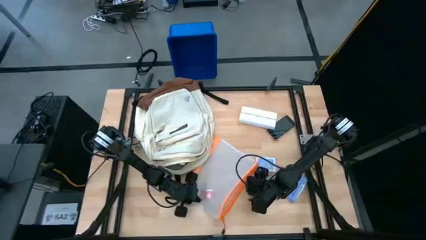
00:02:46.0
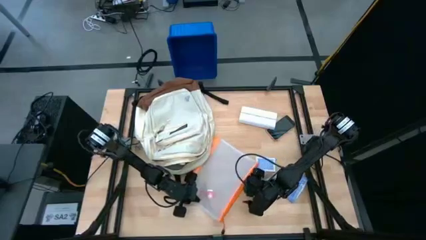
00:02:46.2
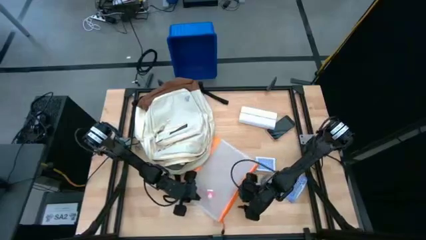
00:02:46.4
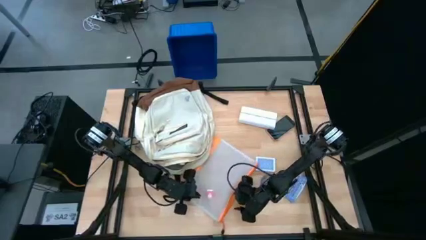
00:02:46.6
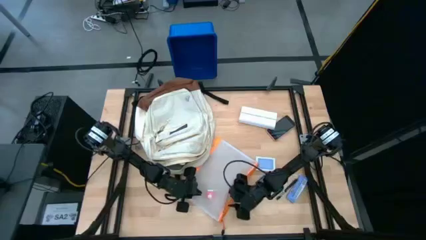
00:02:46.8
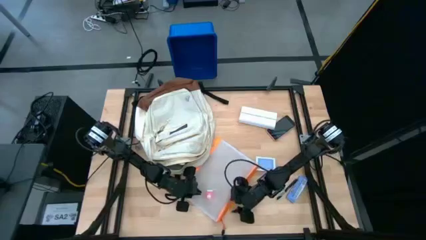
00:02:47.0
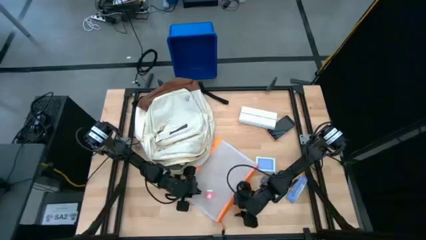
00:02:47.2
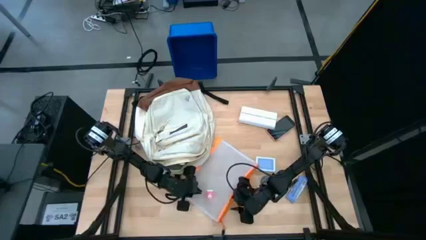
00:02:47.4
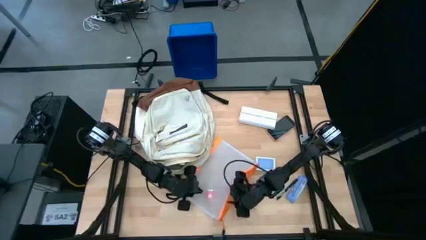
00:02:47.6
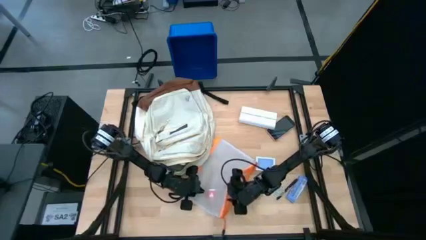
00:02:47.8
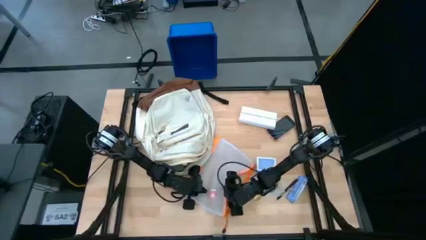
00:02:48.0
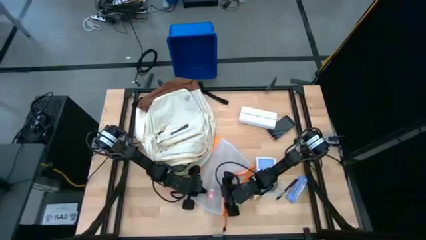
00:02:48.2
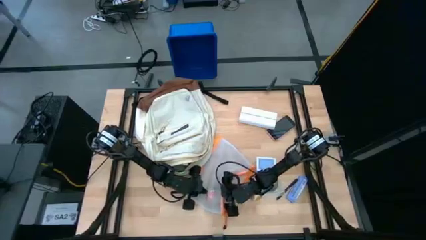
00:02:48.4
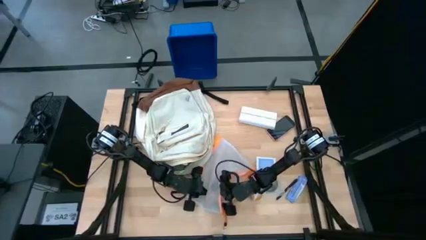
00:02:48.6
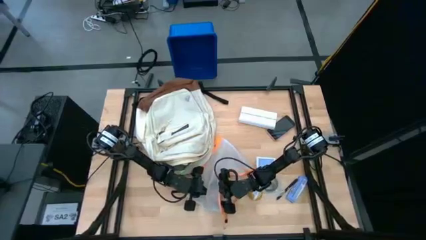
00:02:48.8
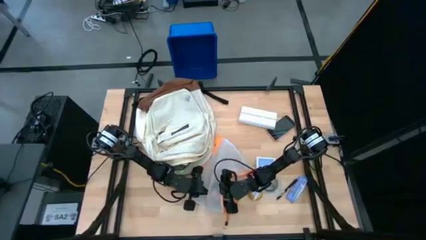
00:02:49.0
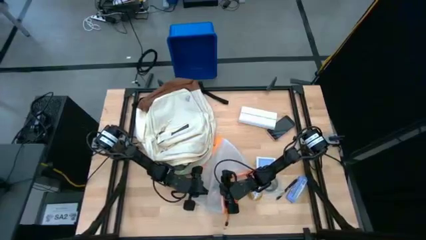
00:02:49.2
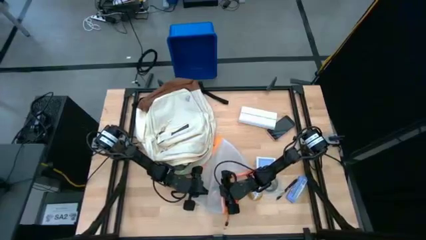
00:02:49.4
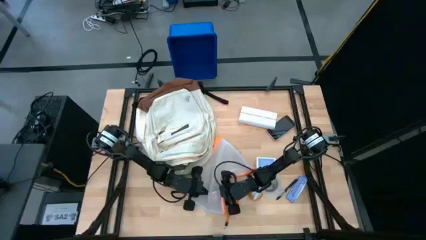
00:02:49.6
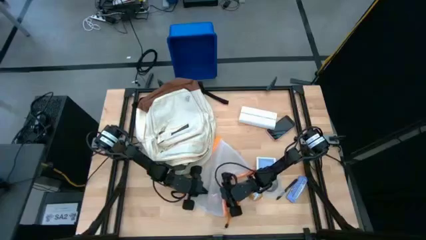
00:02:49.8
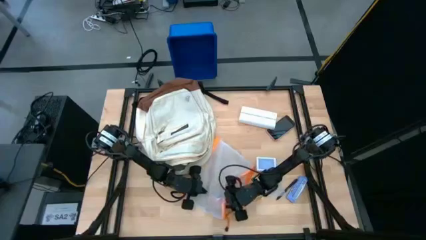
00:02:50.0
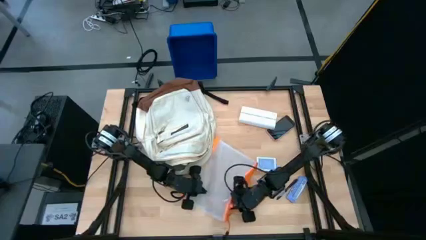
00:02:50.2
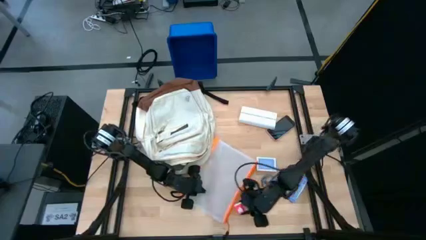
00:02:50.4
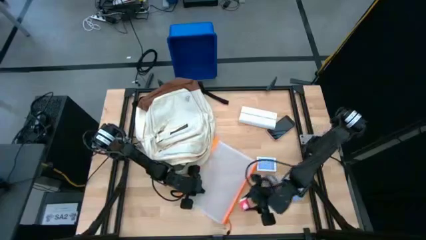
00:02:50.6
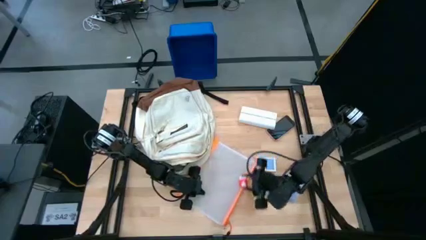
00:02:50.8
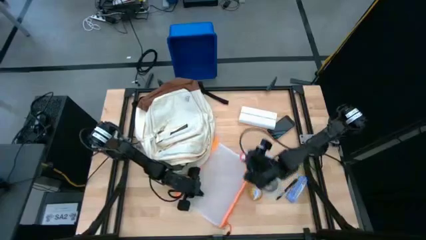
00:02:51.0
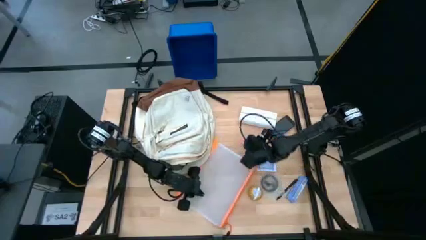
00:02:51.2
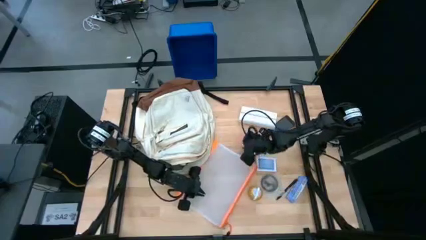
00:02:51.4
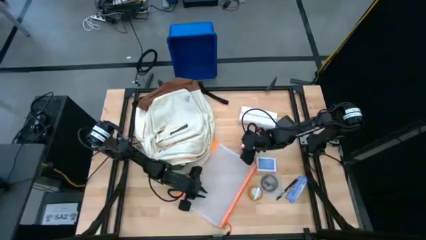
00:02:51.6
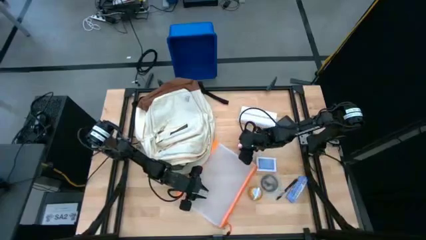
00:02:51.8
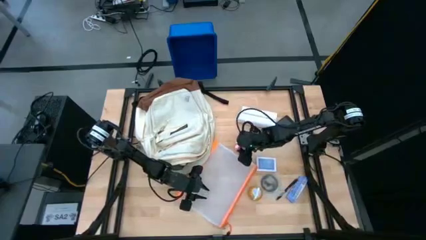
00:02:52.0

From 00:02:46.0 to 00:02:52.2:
Task: Unpack backpack
Remove the red charger adapter from the zip bag

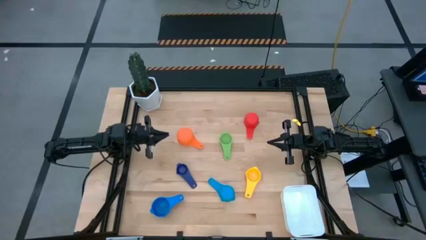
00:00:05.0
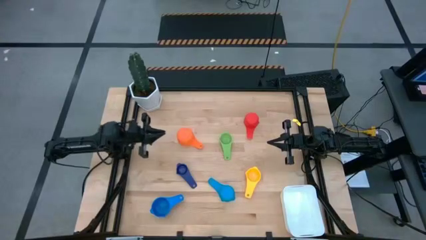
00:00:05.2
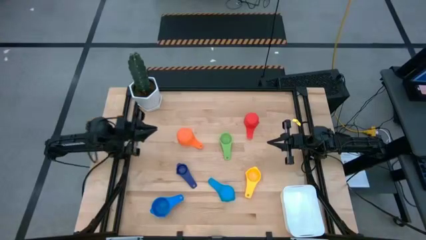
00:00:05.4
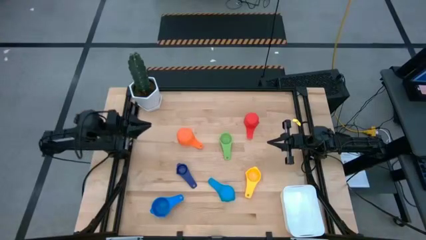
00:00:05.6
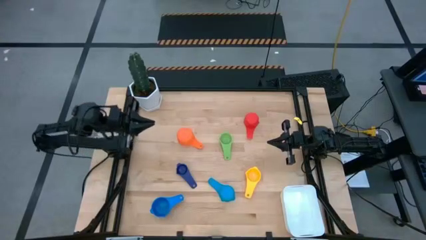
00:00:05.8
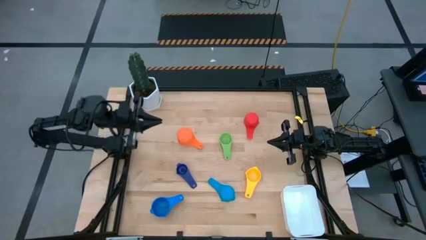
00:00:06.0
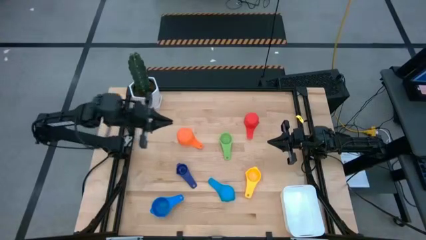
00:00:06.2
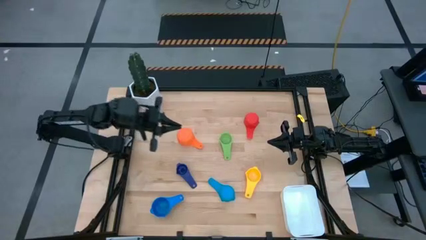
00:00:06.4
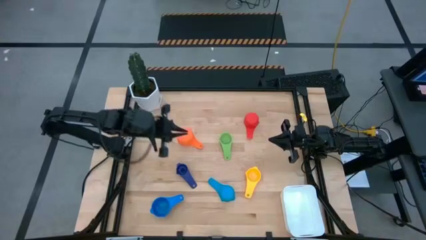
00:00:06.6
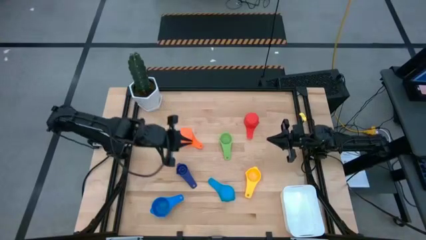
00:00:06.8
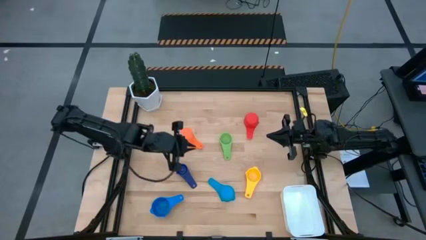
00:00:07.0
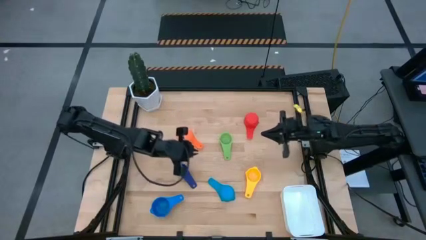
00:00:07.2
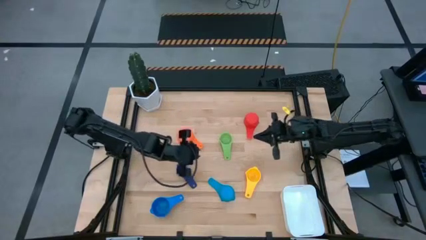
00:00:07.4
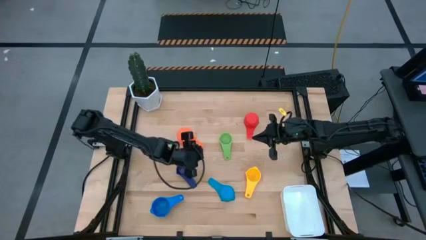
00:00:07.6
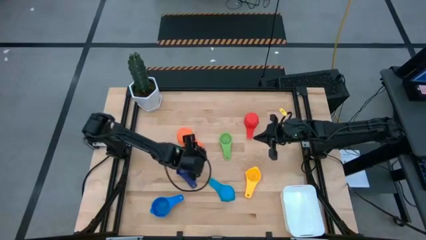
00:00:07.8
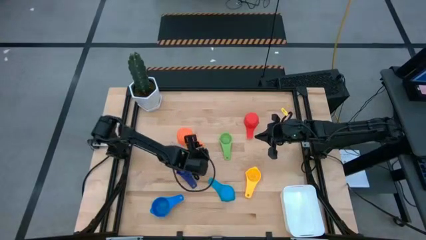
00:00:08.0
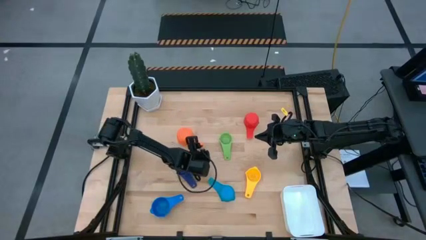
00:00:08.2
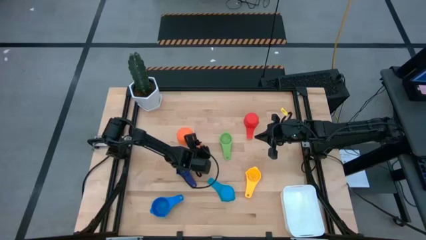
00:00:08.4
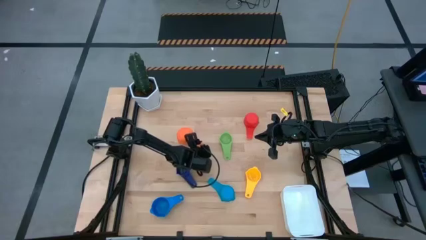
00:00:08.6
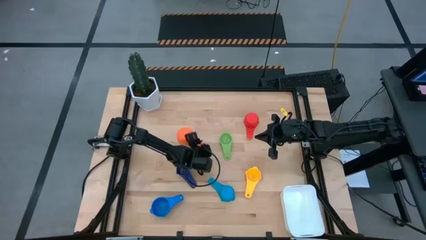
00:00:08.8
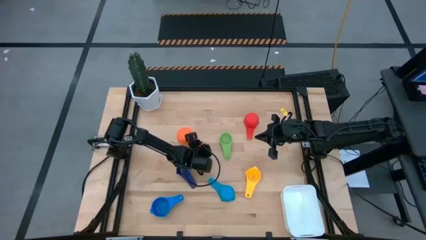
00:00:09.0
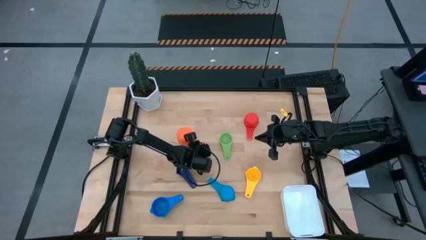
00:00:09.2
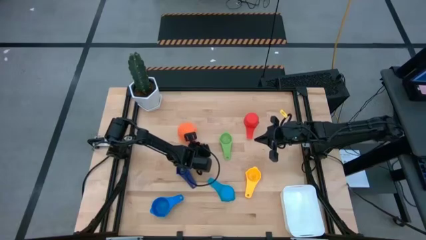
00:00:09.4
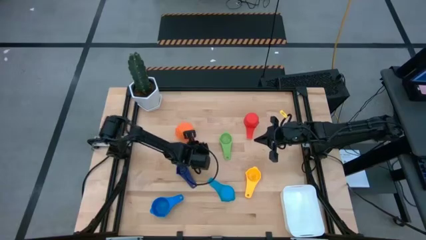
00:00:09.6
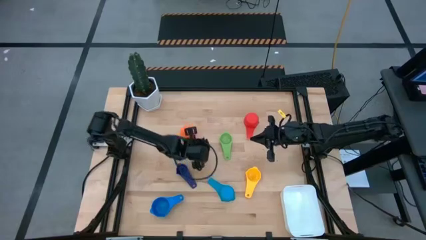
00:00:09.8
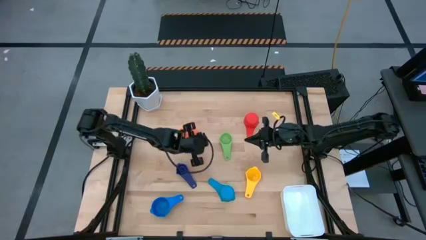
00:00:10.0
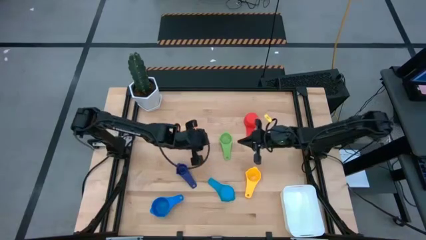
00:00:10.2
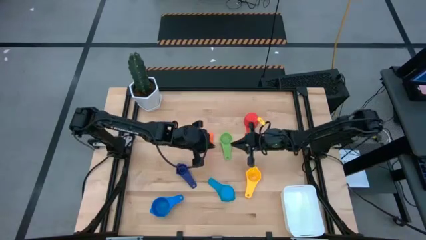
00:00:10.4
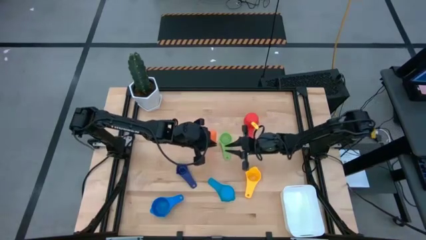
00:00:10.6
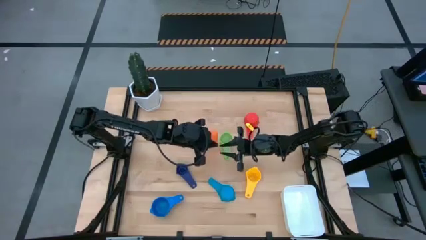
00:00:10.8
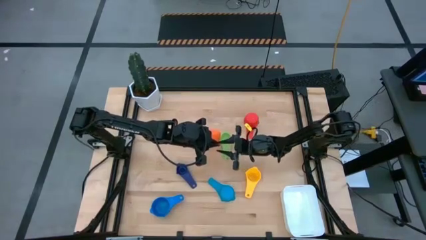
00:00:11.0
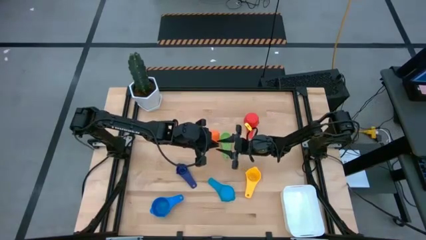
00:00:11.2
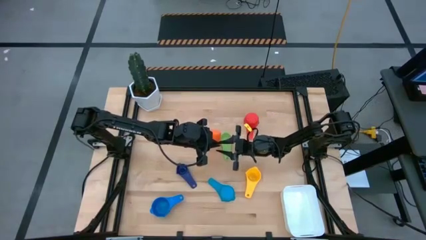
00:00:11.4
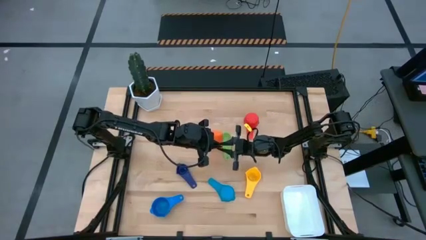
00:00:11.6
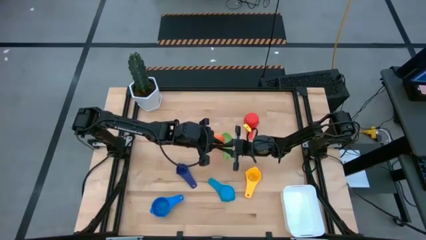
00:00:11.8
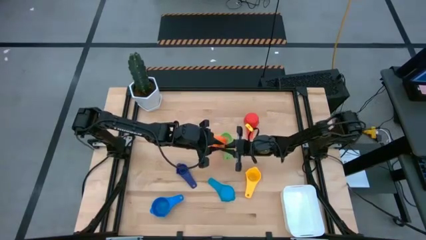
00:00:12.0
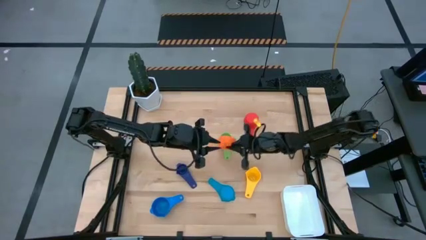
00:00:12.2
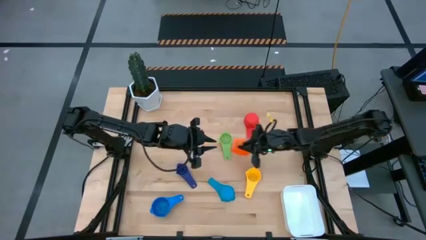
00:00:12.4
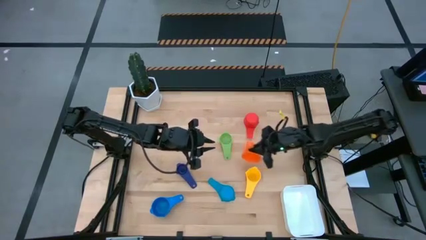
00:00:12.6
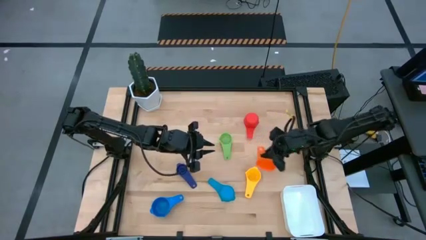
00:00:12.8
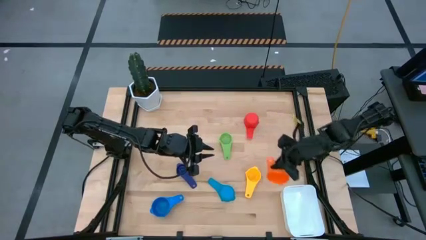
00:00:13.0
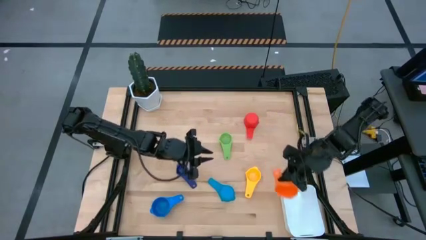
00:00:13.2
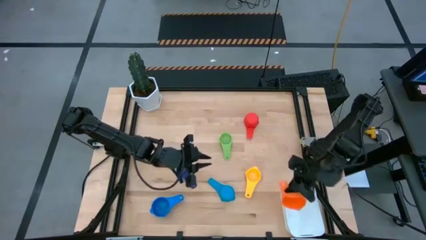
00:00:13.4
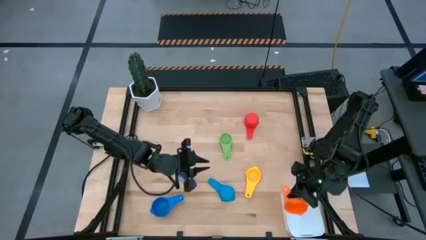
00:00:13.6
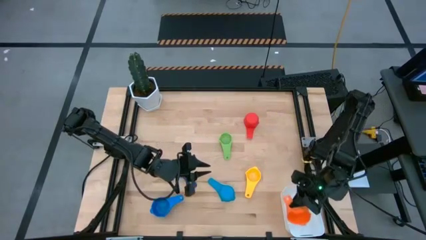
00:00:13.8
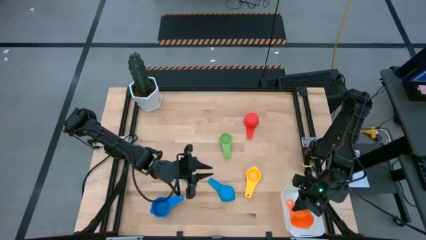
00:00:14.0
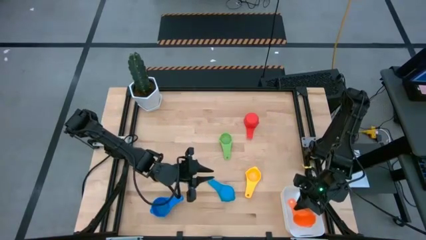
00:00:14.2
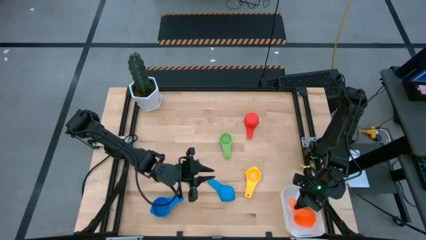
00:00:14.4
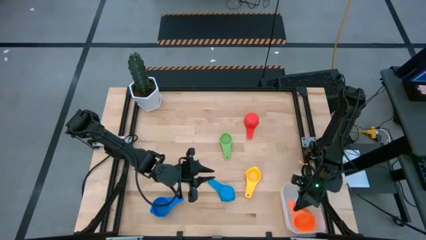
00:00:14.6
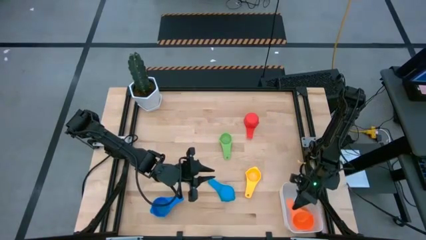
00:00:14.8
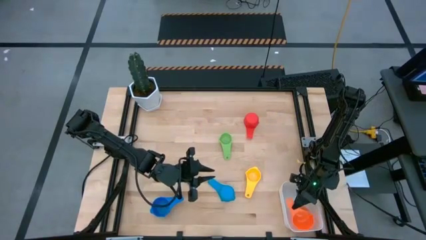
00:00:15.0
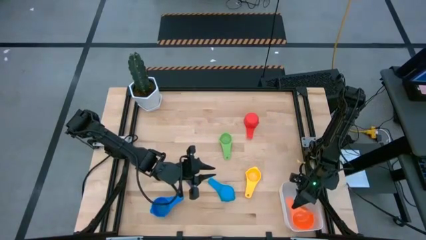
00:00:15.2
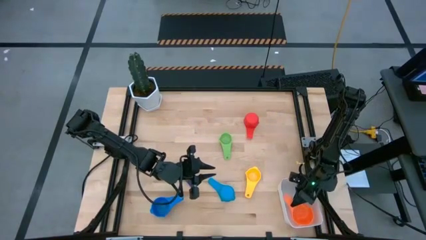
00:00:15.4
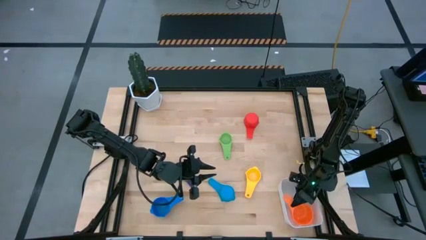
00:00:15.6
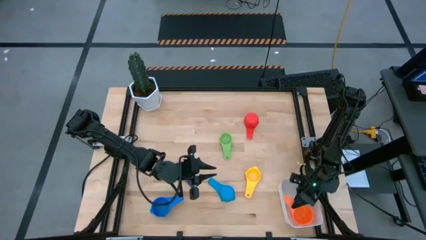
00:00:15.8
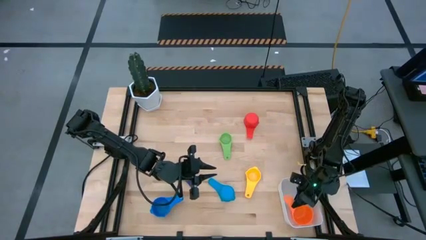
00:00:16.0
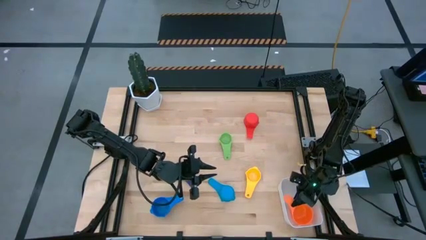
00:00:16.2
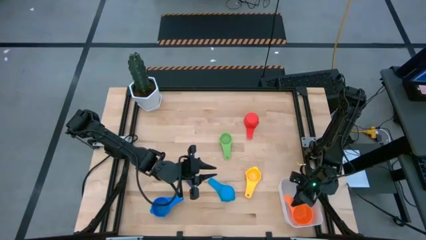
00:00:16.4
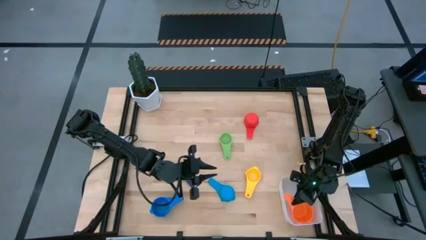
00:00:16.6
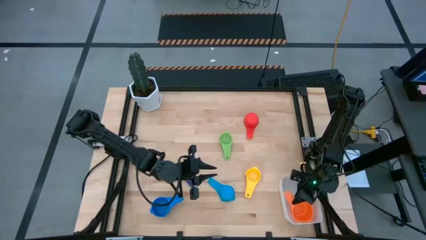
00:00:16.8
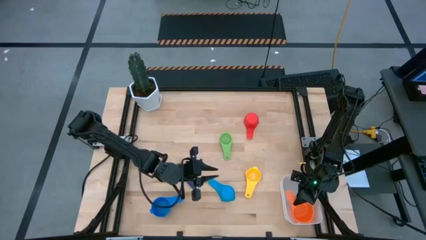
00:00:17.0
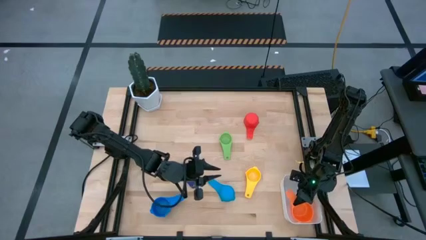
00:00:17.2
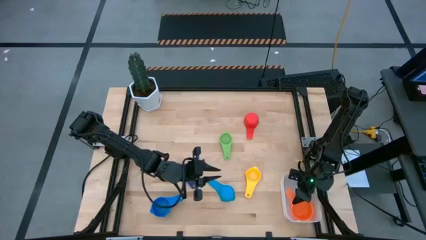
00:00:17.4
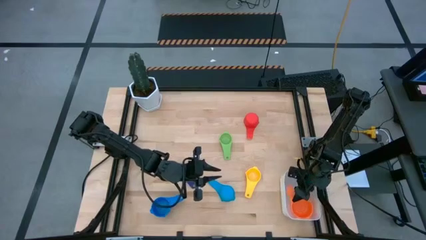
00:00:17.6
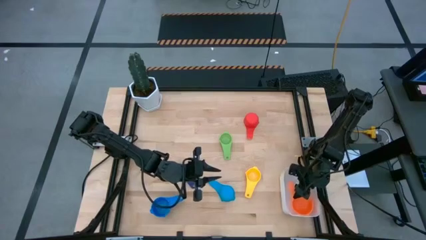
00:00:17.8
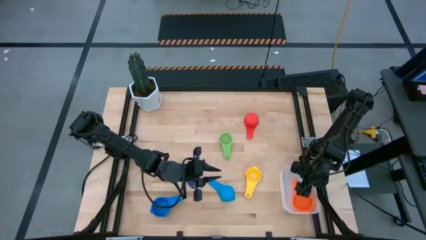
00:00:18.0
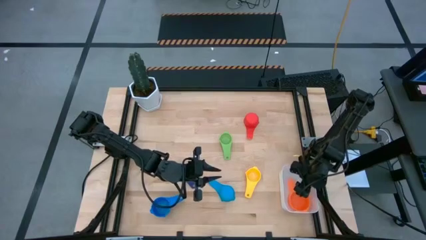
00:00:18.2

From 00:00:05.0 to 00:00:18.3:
Task: Nest measuring cups in basket
Put the orange measuring cup into the white bin
